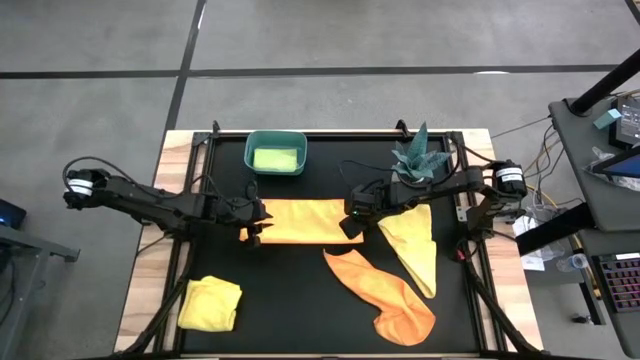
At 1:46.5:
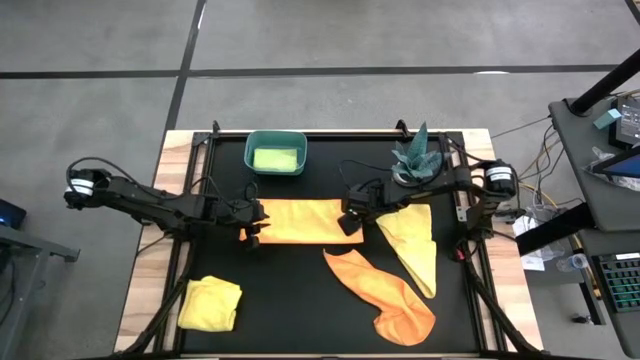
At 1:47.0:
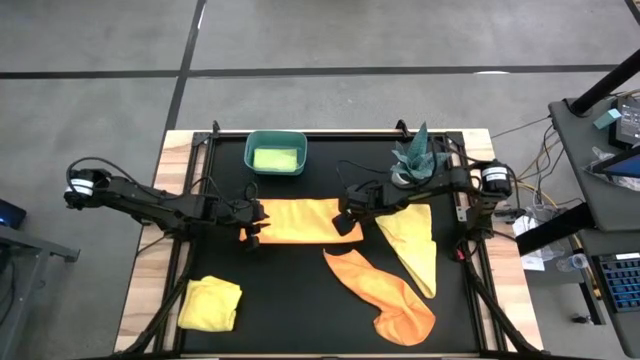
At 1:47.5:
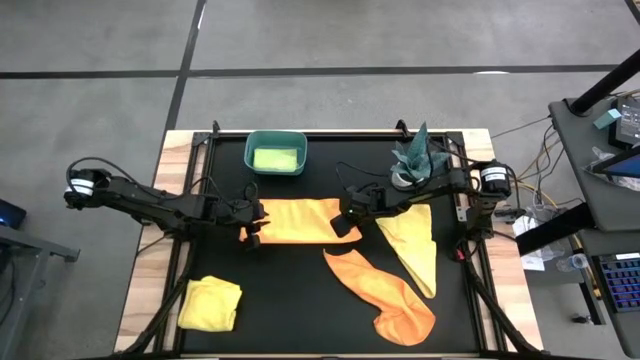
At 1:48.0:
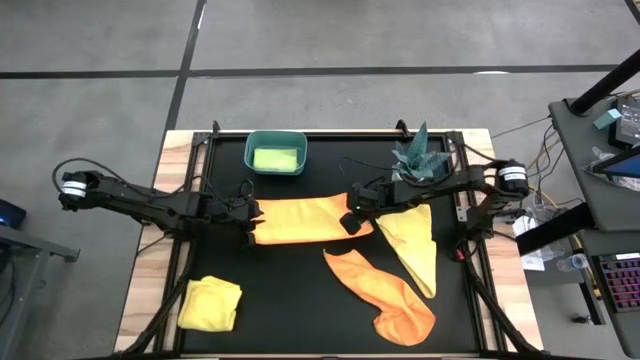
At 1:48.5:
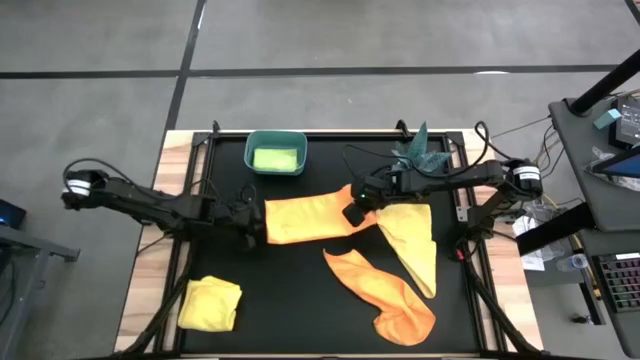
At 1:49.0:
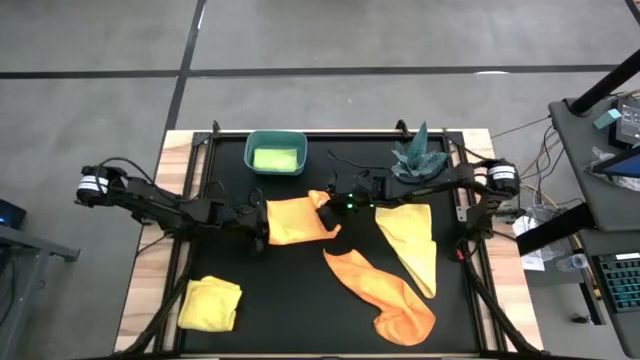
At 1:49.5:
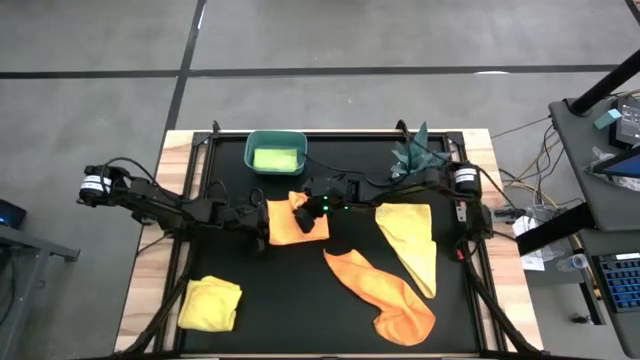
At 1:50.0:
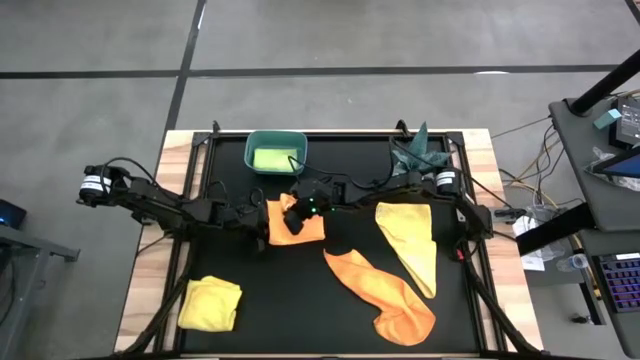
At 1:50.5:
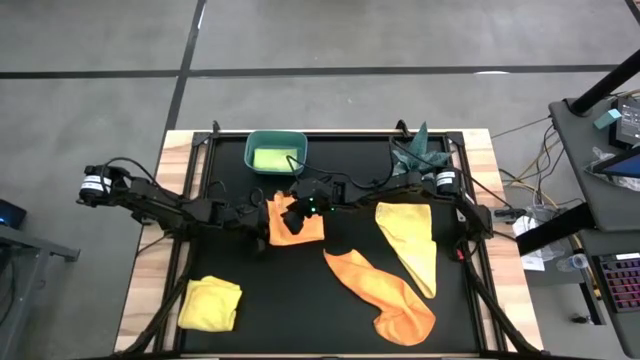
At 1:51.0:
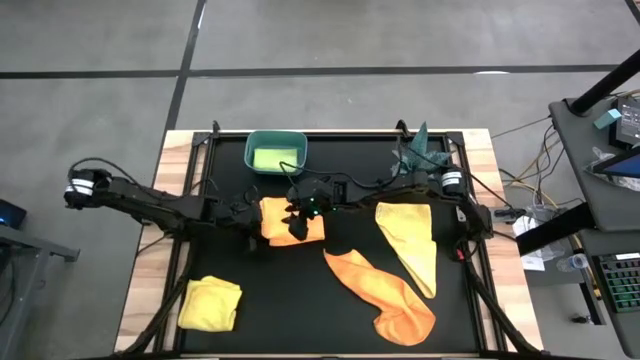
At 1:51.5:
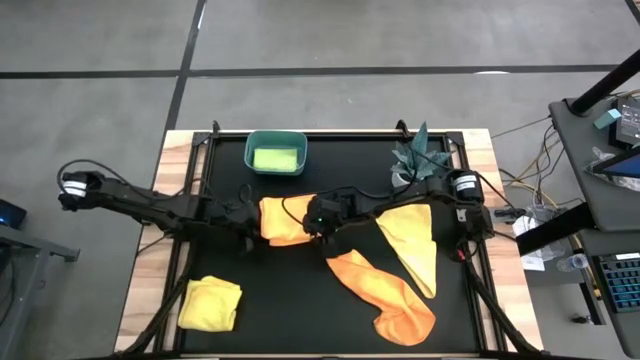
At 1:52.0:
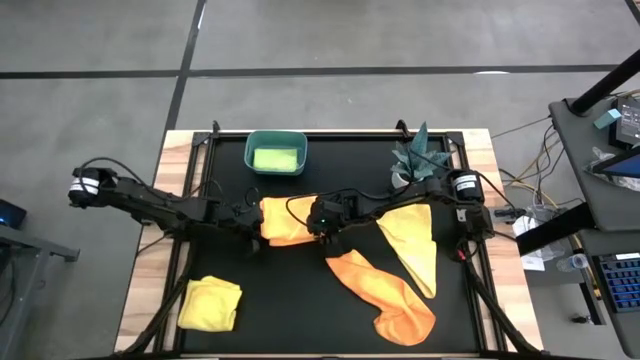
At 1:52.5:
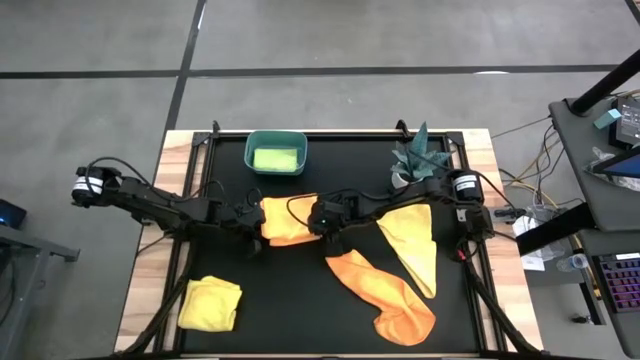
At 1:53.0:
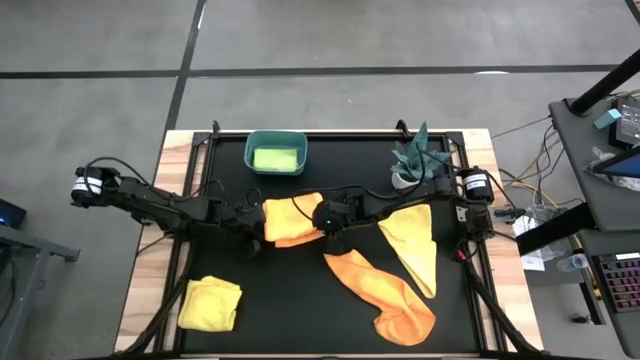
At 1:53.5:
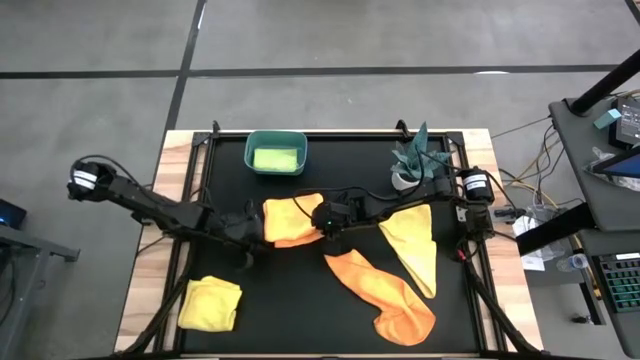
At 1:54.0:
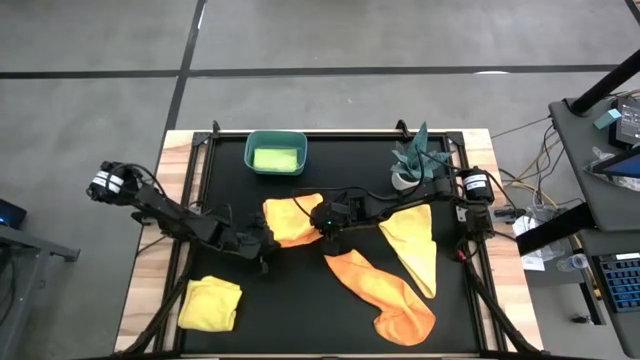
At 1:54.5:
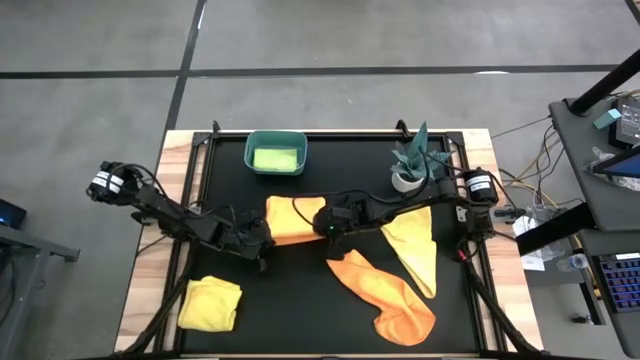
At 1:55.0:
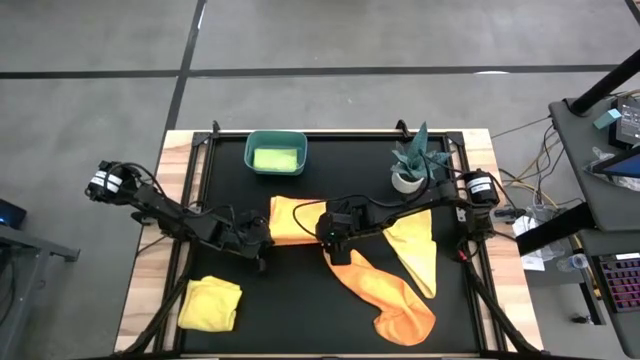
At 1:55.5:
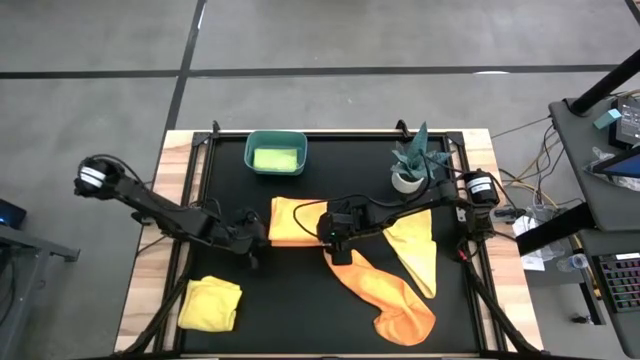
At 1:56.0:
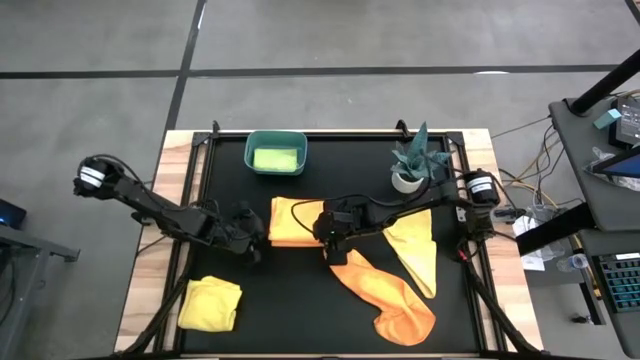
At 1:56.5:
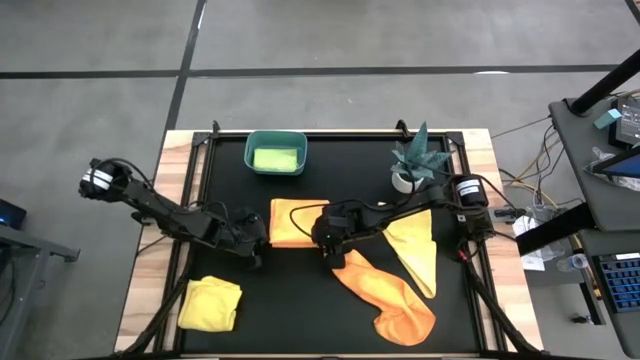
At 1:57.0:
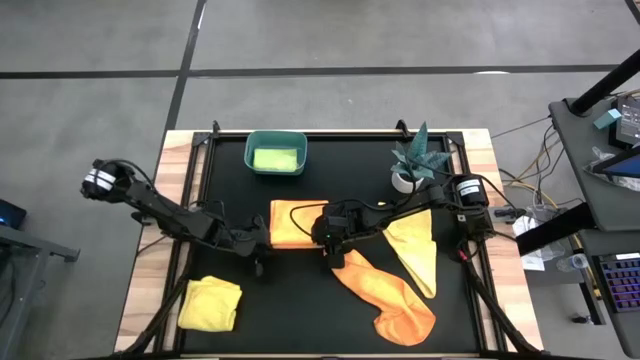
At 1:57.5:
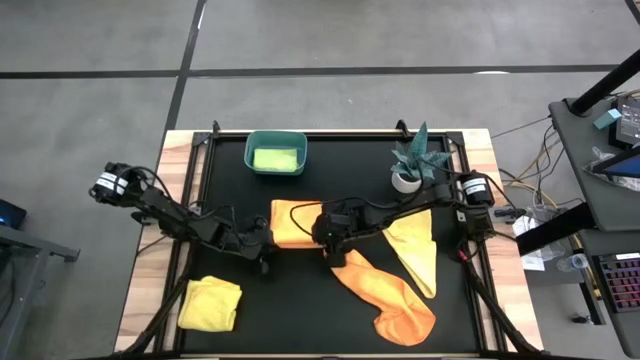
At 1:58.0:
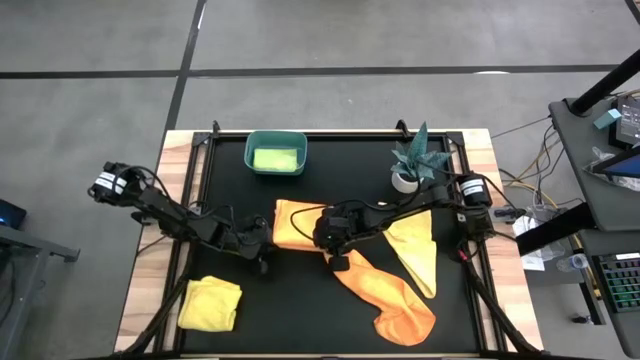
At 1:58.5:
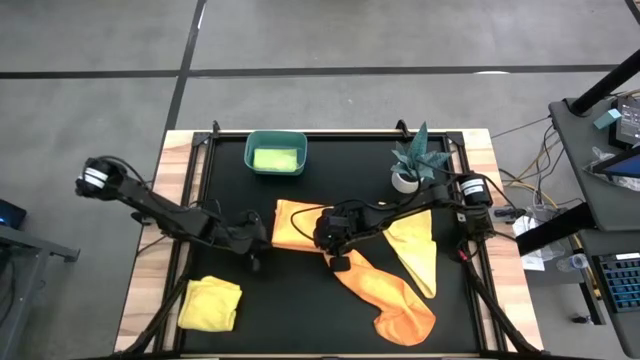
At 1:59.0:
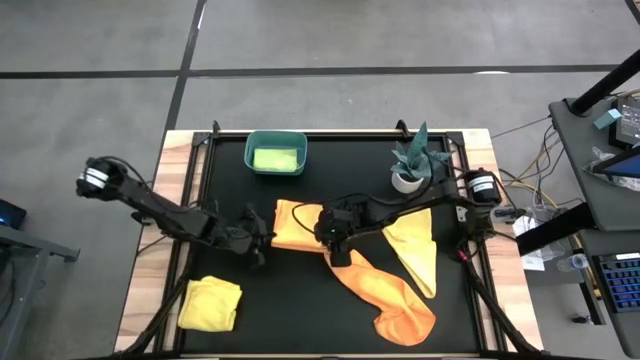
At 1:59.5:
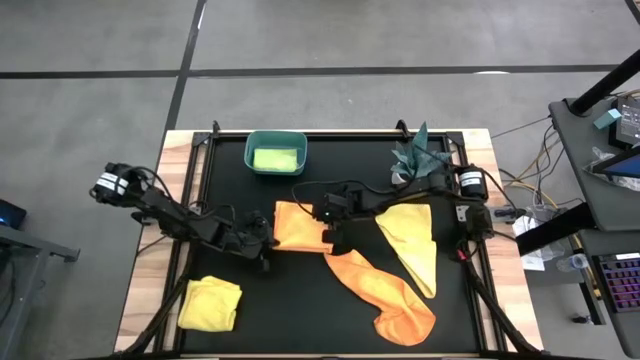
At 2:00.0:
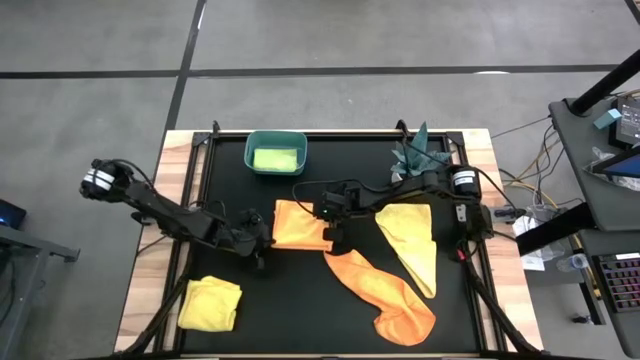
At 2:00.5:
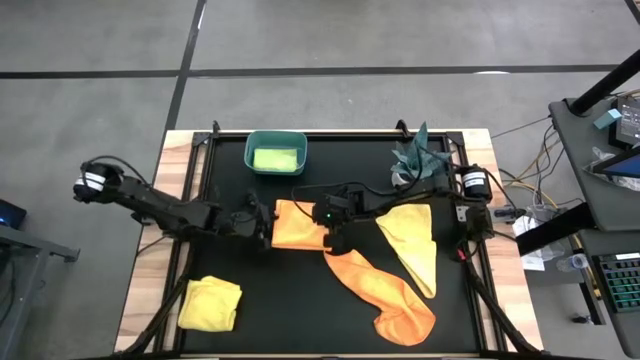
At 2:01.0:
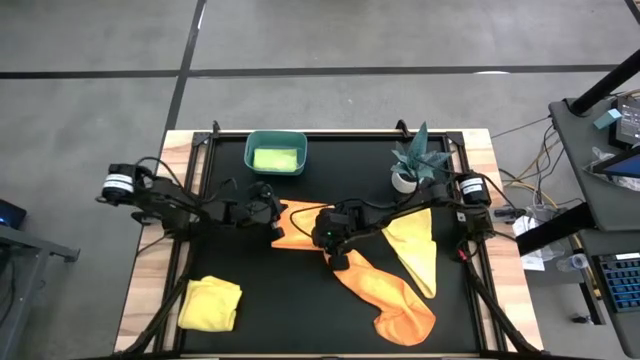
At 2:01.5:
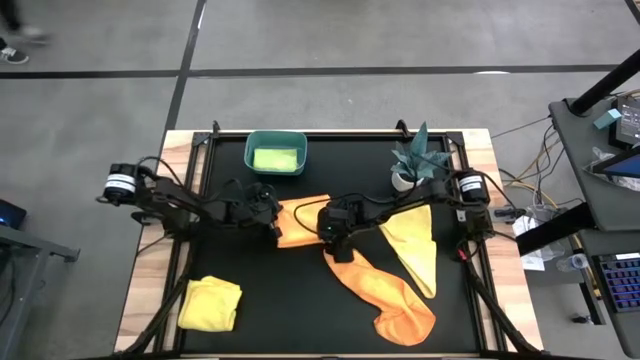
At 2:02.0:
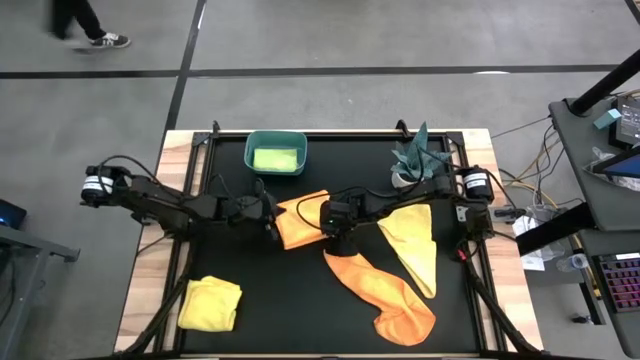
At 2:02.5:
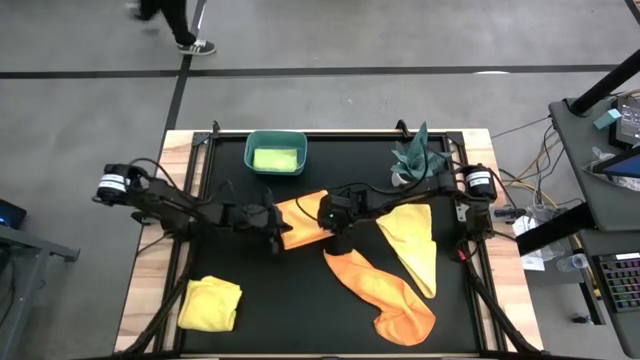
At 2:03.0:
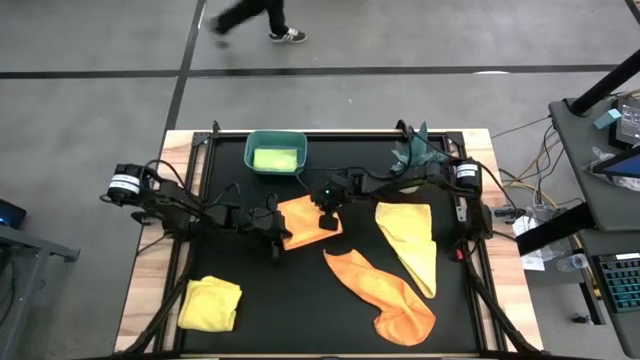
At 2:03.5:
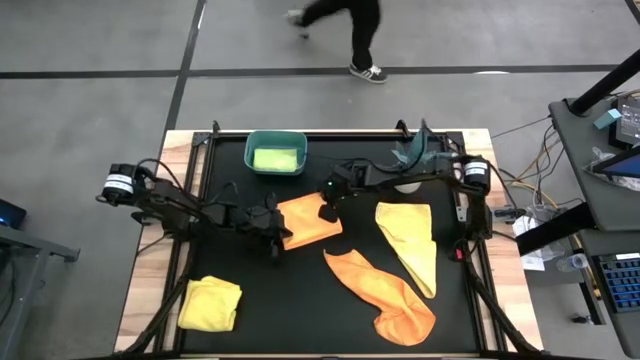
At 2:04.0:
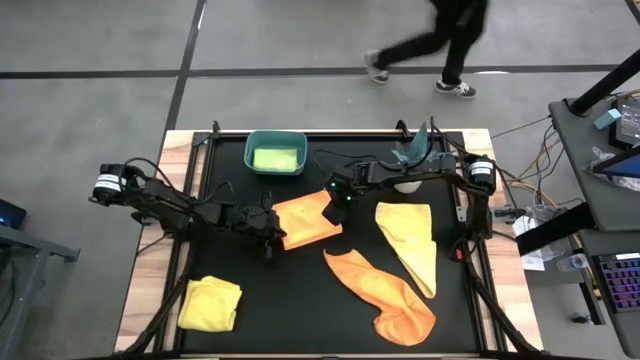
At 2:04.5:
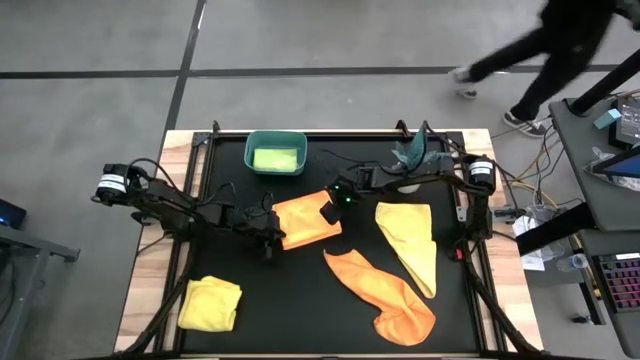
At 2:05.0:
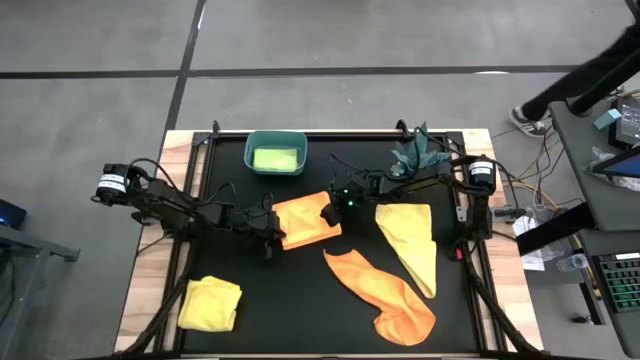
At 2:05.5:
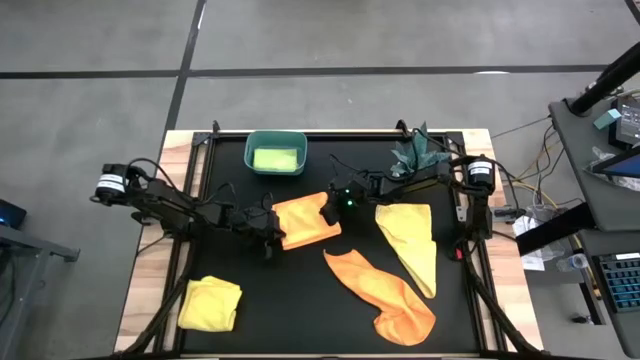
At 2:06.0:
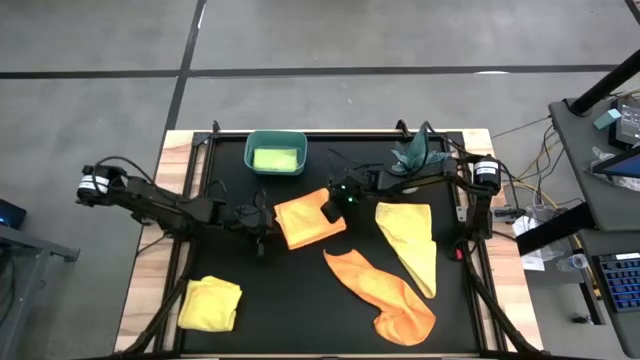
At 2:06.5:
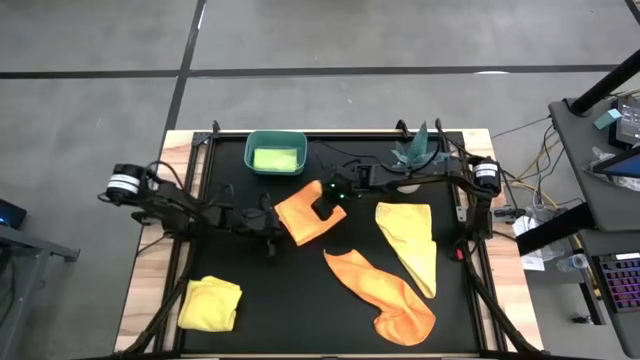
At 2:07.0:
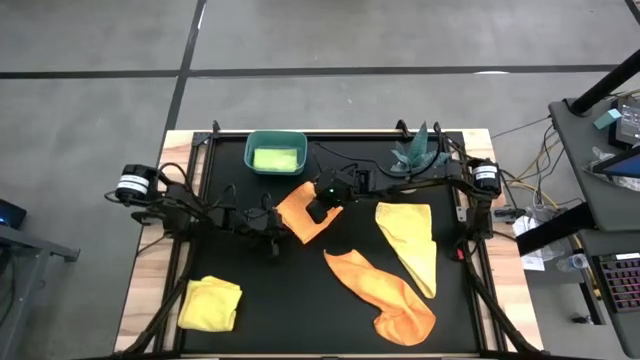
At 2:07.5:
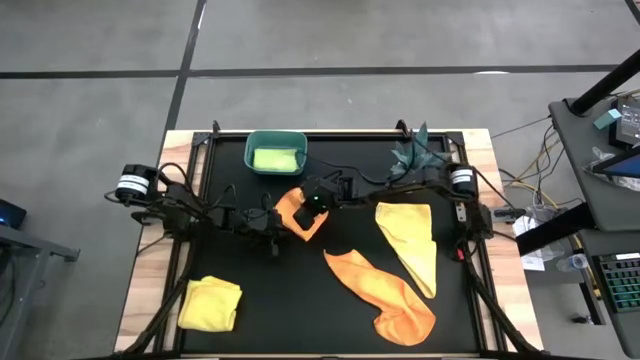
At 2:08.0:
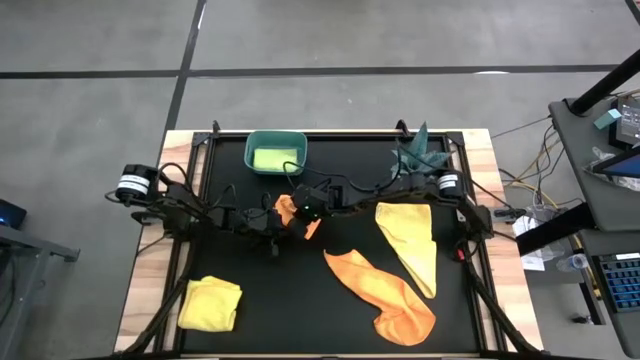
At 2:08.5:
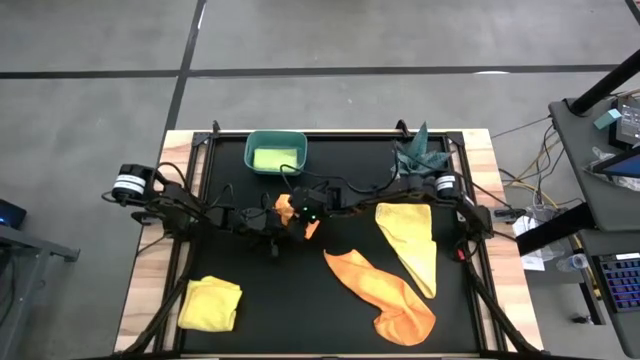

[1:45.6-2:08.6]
Task: Fold microfiber towels
Fold the top orange microfiber cloth
